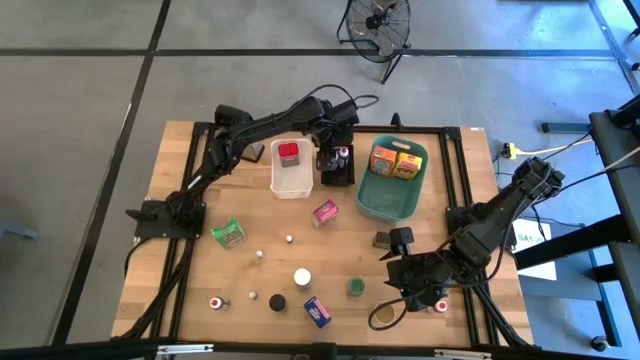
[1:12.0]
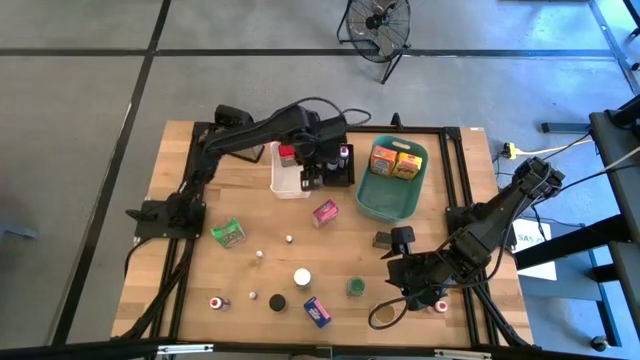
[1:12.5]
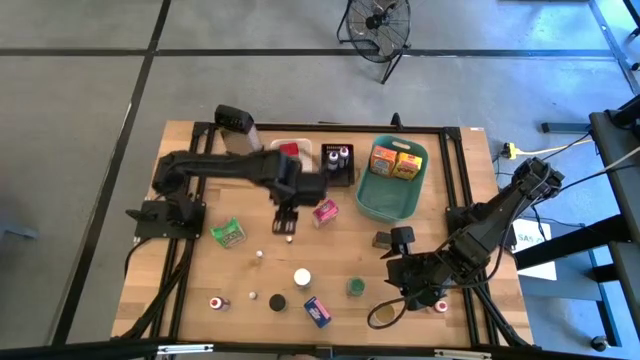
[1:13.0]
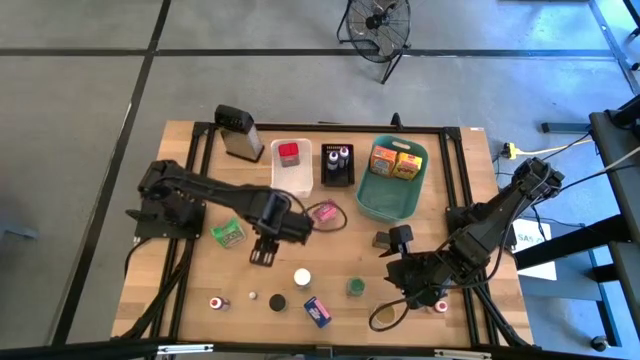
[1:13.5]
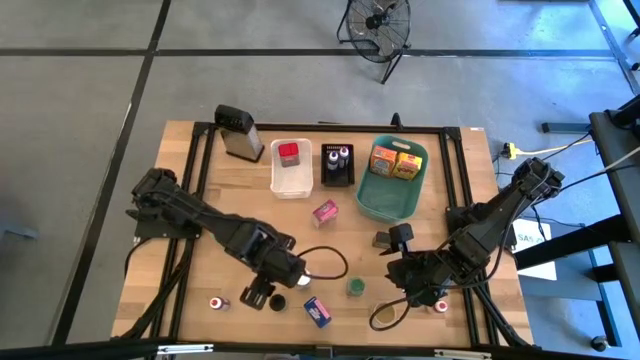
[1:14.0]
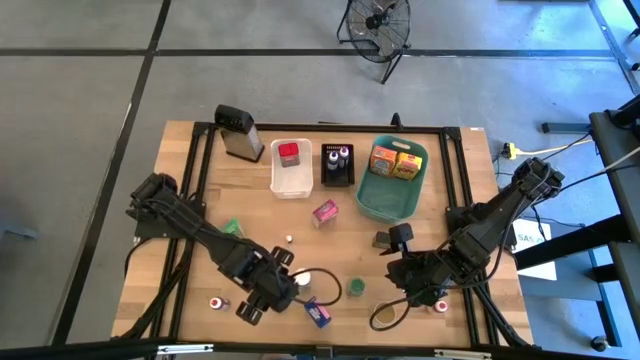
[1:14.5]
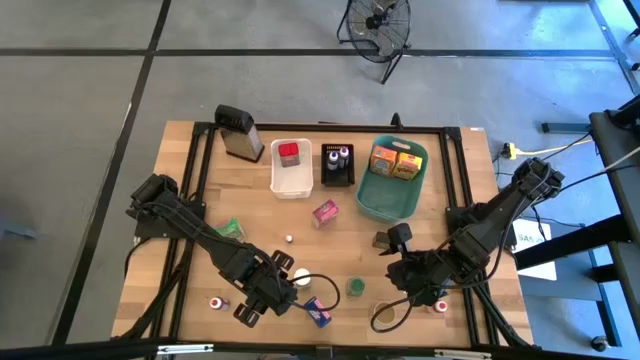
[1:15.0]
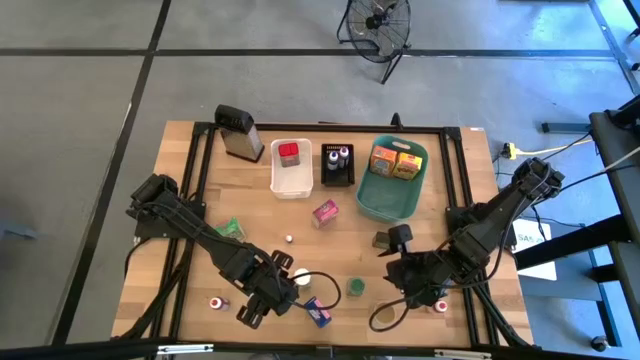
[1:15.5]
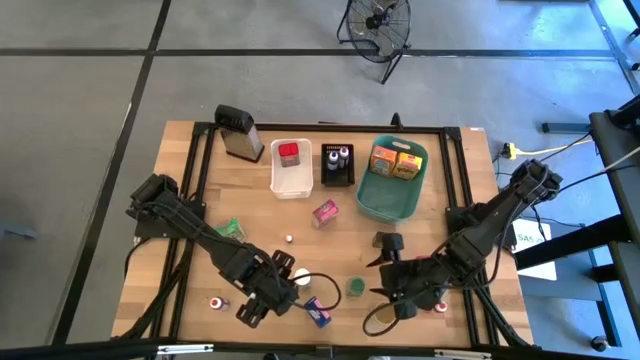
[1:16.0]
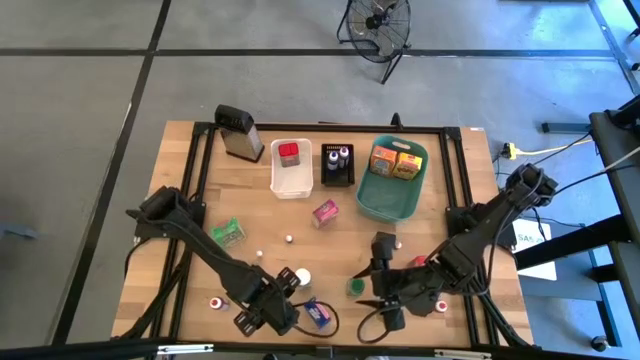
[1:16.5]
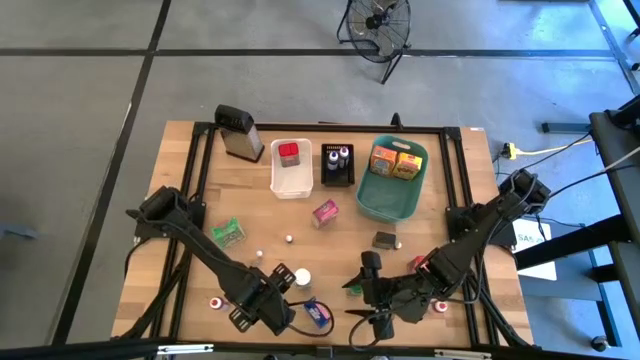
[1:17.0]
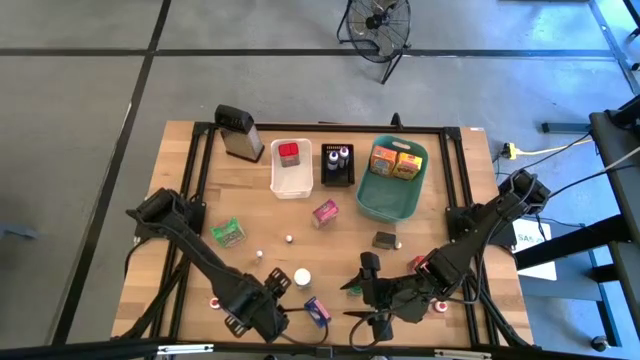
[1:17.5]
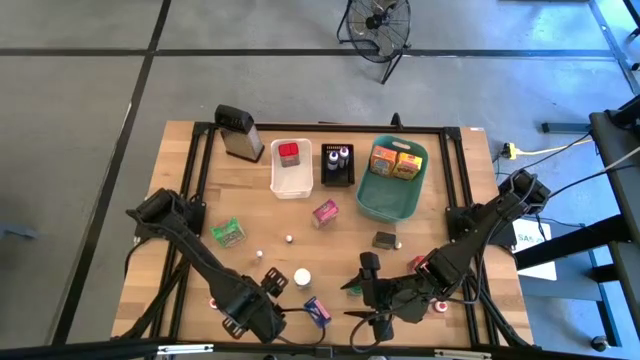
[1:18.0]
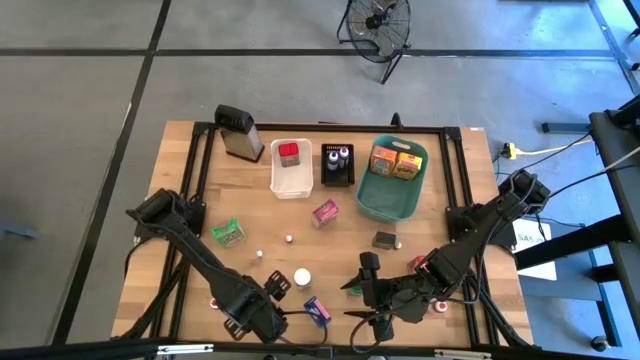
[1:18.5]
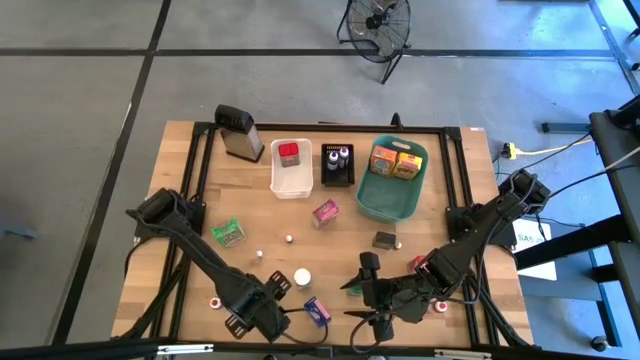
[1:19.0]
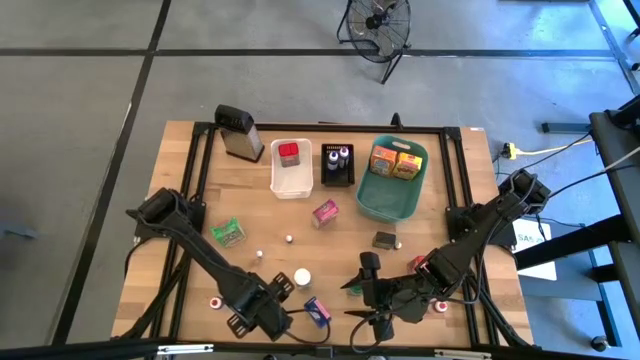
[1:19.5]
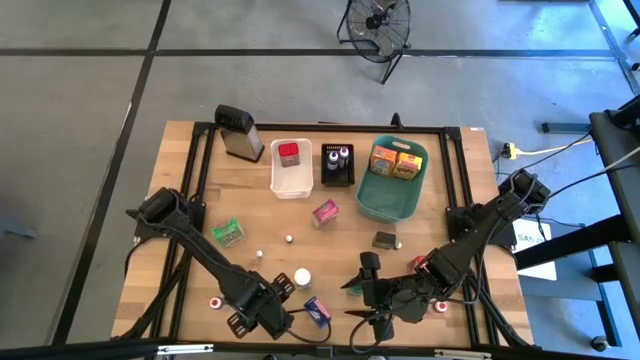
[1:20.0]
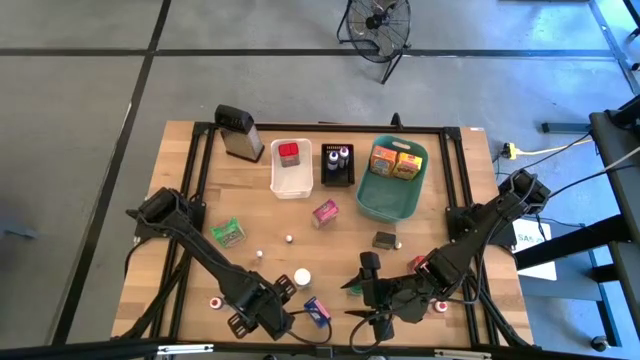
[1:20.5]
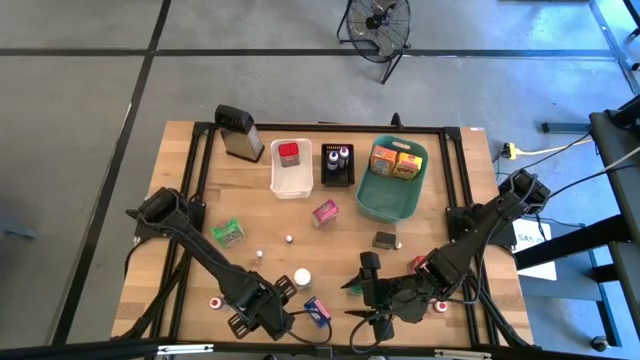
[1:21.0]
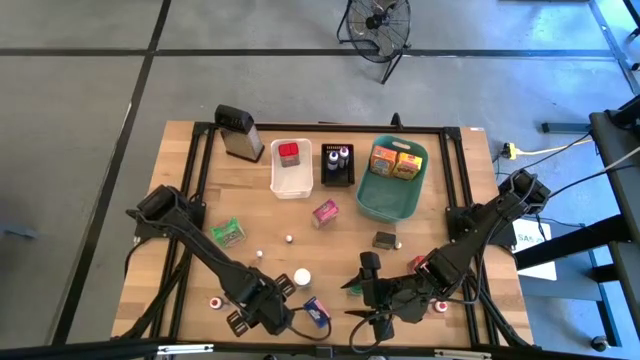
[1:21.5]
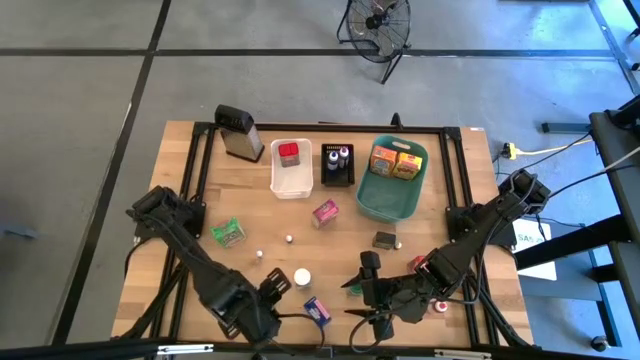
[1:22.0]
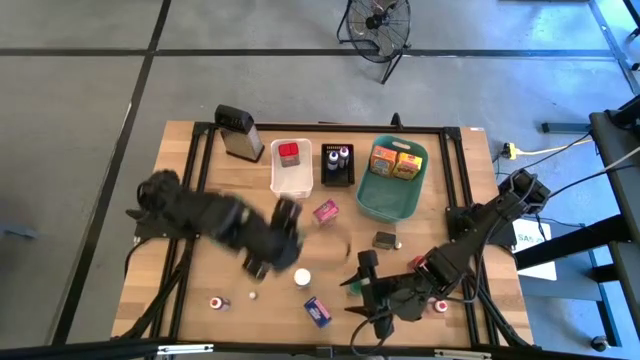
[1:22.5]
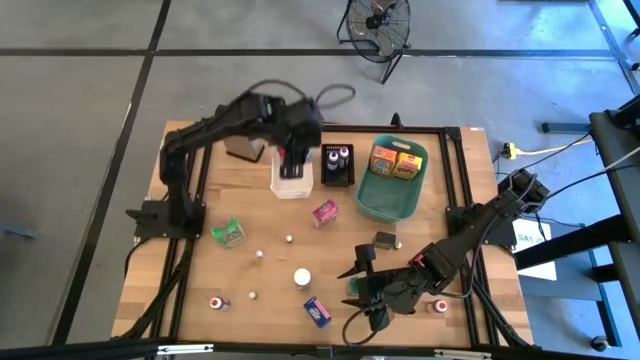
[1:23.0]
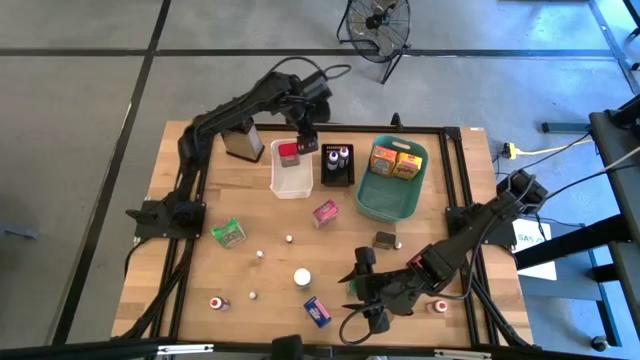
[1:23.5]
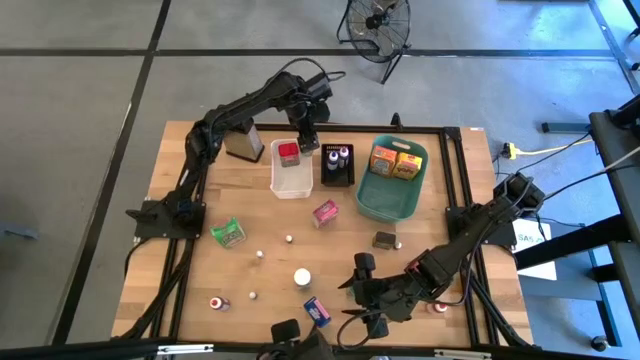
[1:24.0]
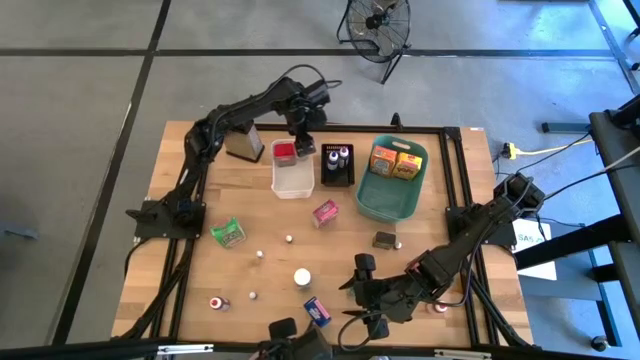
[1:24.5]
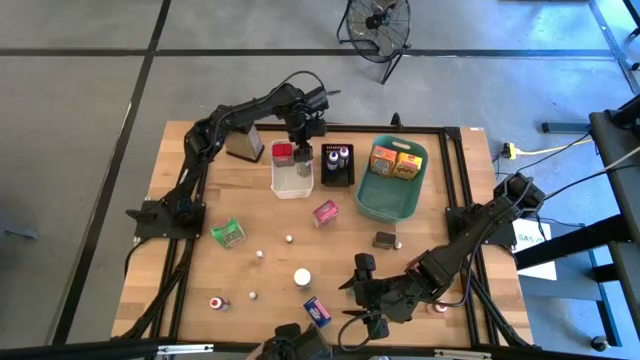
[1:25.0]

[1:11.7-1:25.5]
Task: Pick & Place Kitchen Items
Put the black spice bottle into the white bin

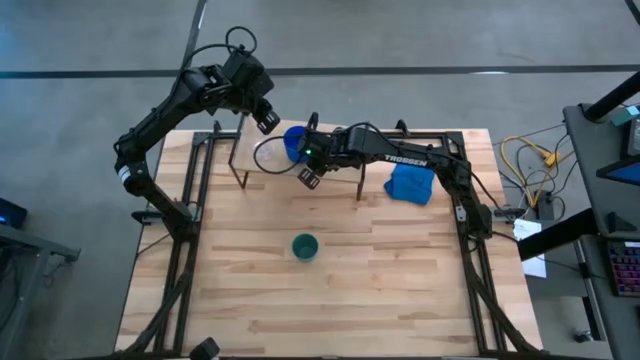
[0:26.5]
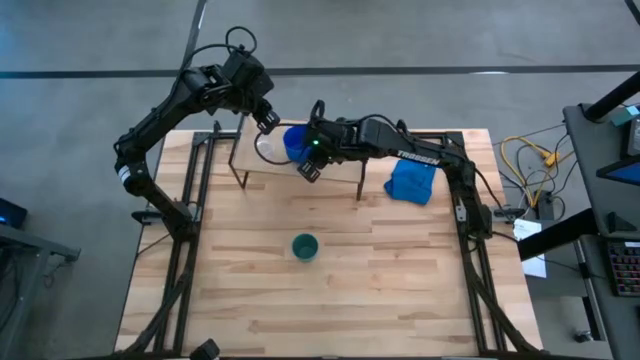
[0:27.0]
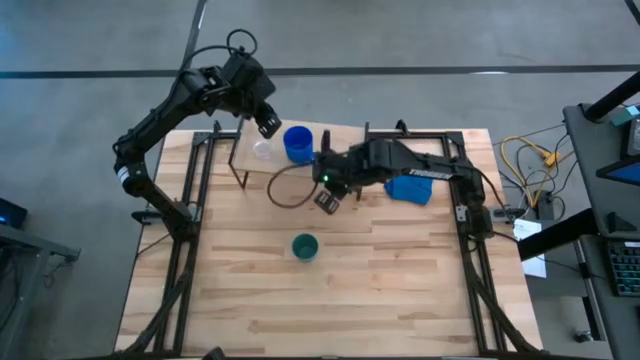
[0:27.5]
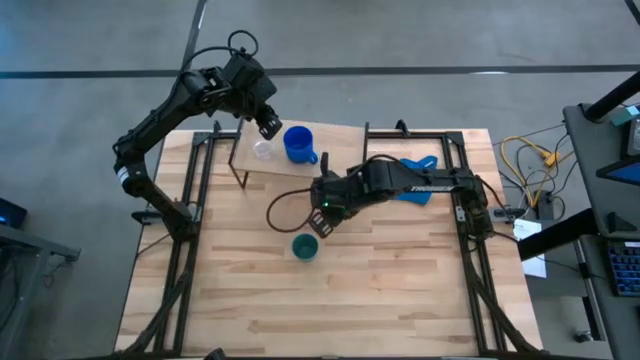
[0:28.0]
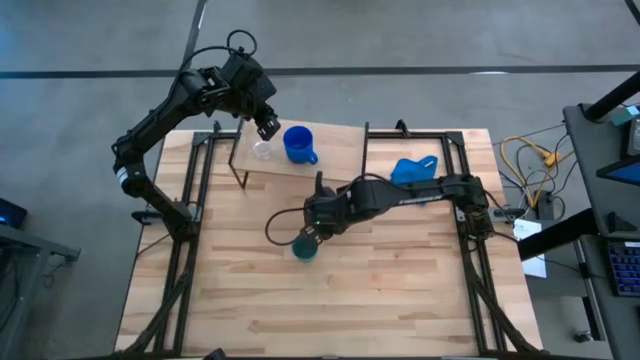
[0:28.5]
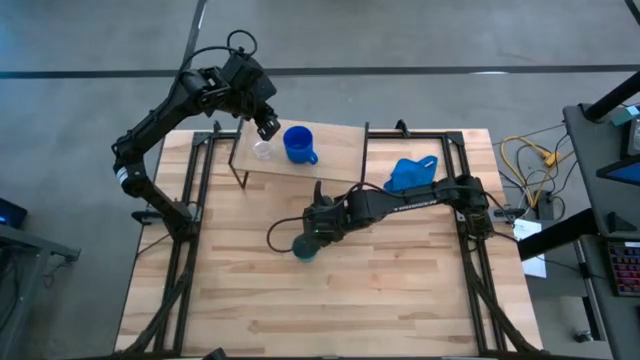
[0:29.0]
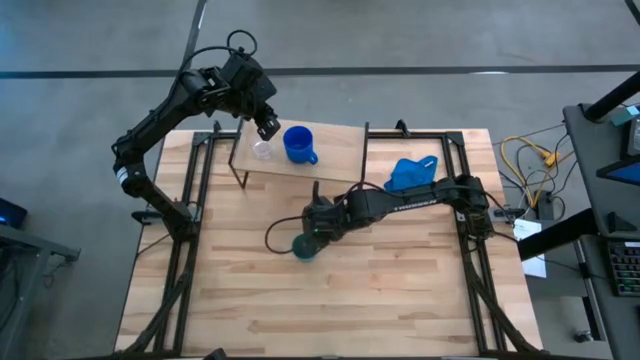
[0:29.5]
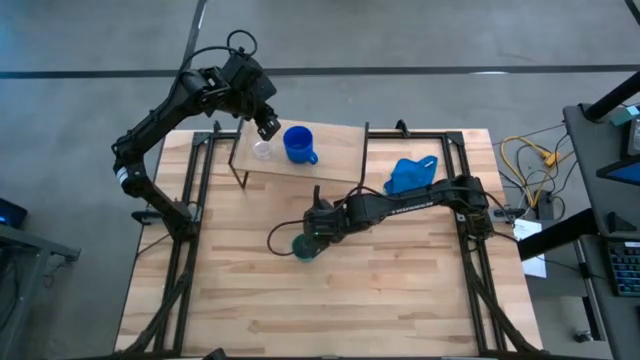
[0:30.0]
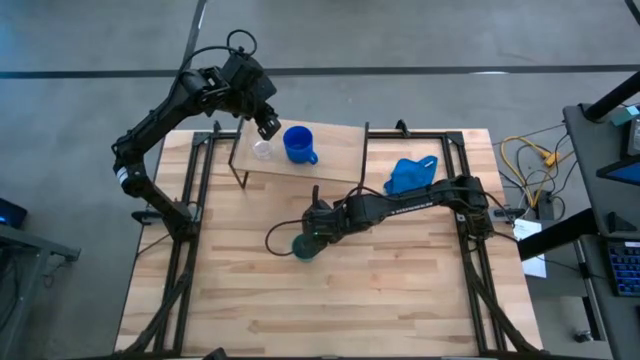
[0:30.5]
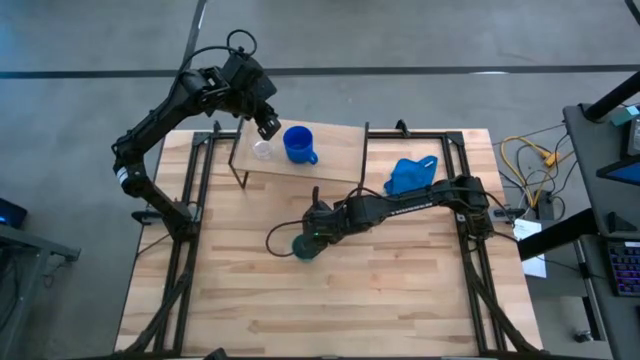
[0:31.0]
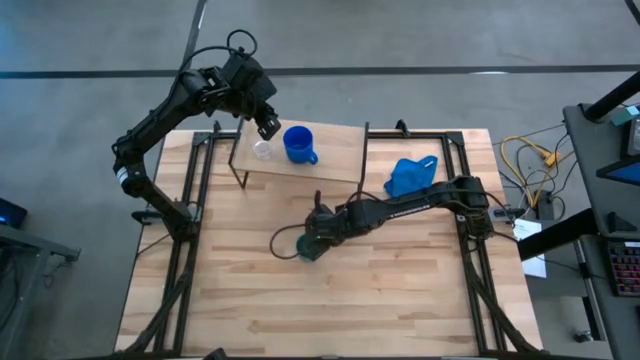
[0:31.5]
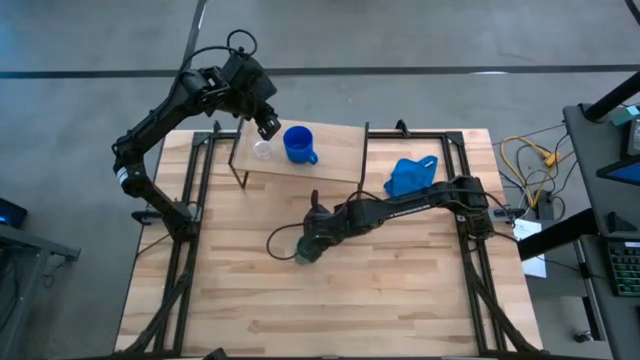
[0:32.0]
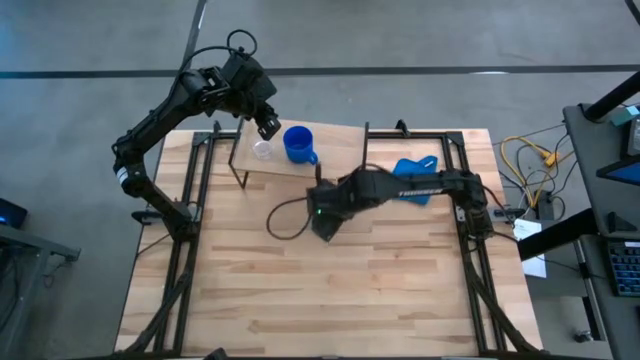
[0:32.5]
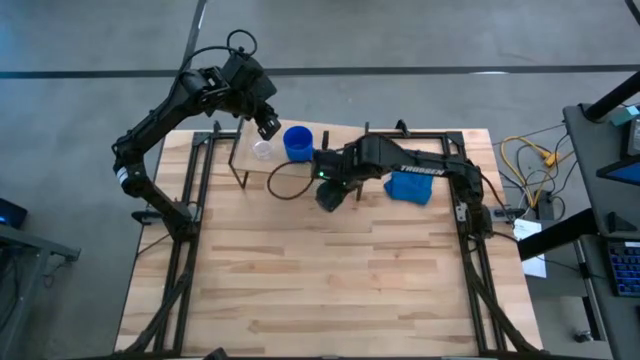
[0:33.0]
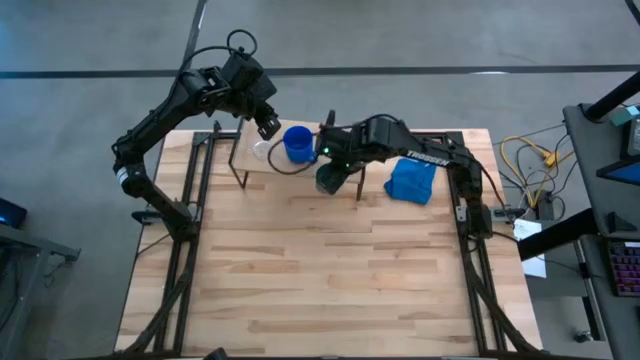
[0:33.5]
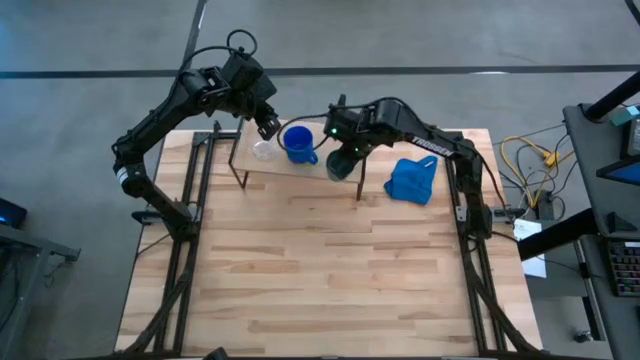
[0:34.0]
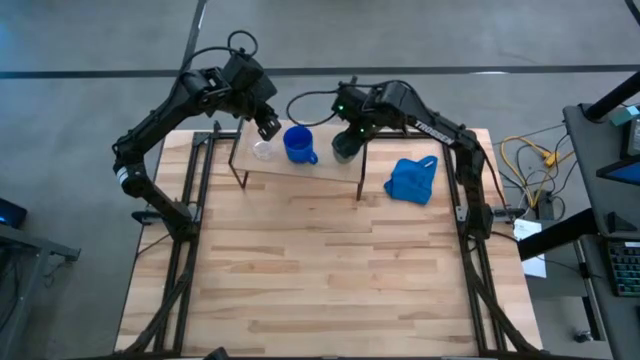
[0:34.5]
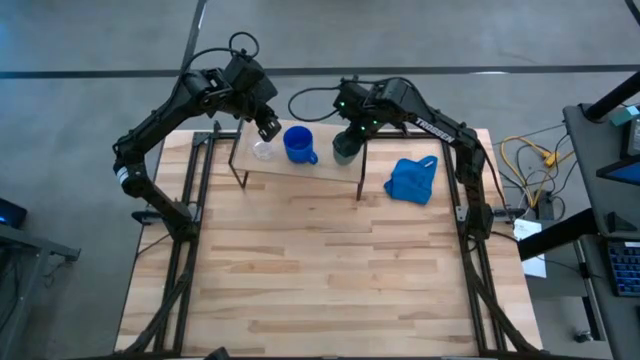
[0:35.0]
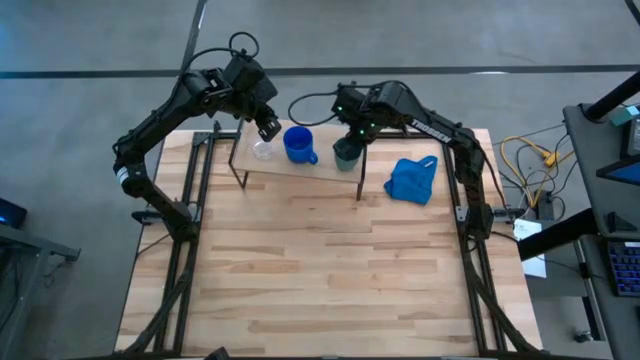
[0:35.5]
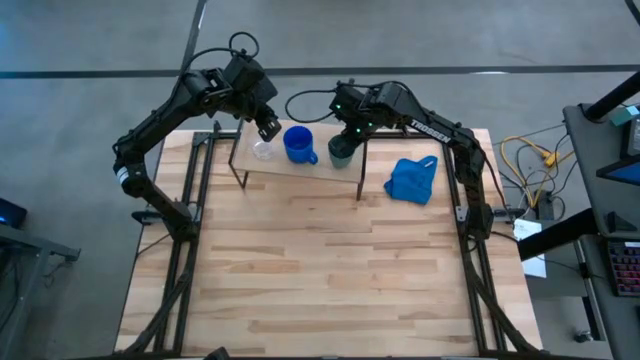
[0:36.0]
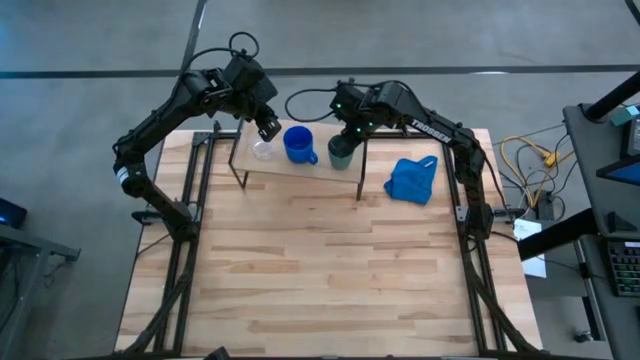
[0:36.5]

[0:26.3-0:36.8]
Task: Stack small to large cups/mugs on shelf
Put the green cup on the shelf
